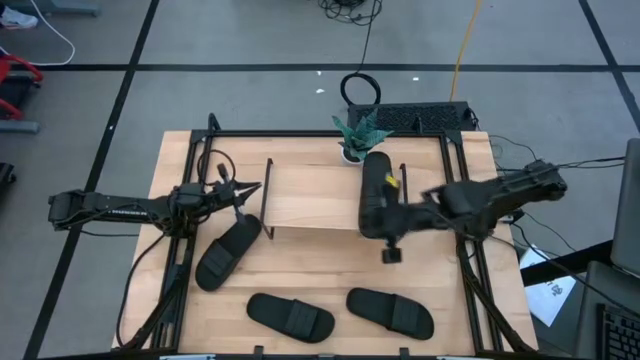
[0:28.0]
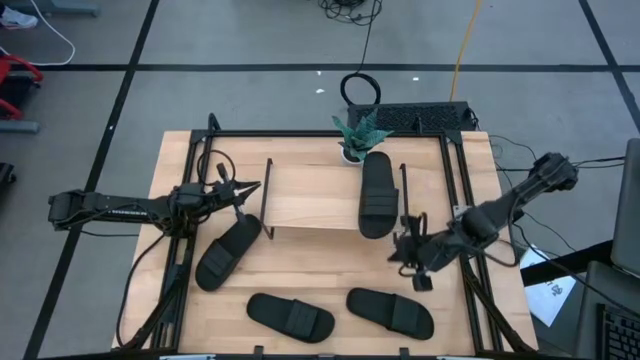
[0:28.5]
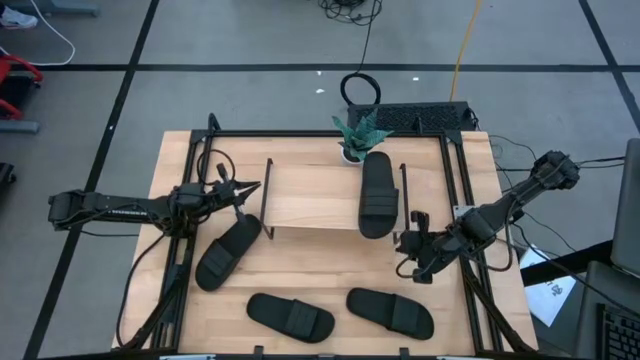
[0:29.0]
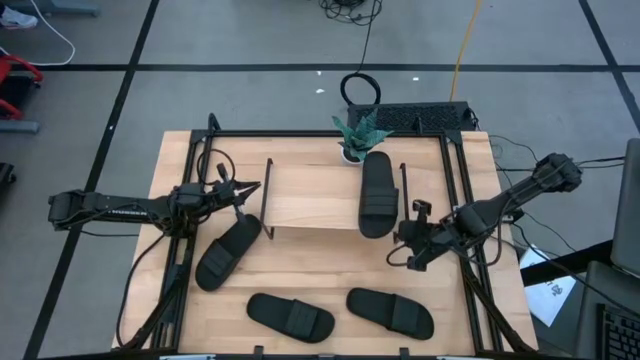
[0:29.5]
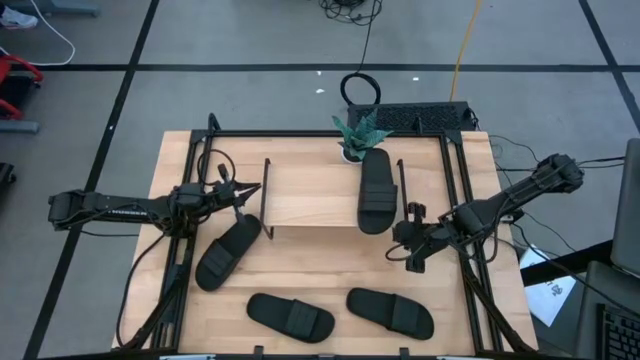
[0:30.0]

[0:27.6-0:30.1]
Task: Pick and place slides into the shelf
Adjust the shelf

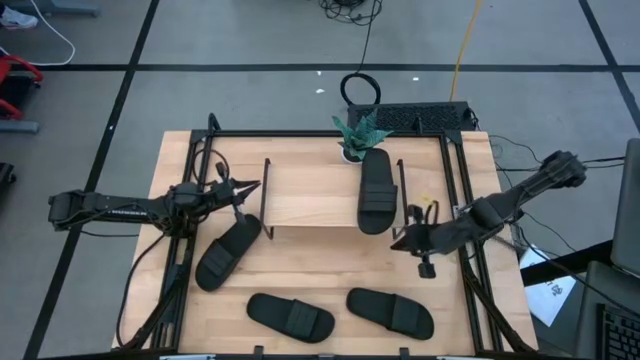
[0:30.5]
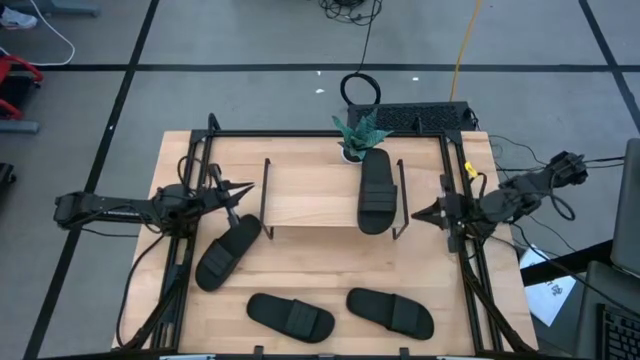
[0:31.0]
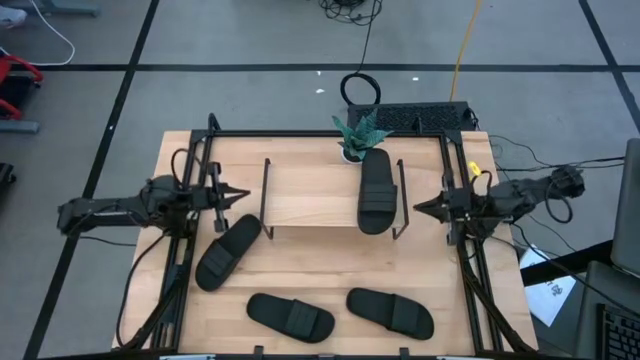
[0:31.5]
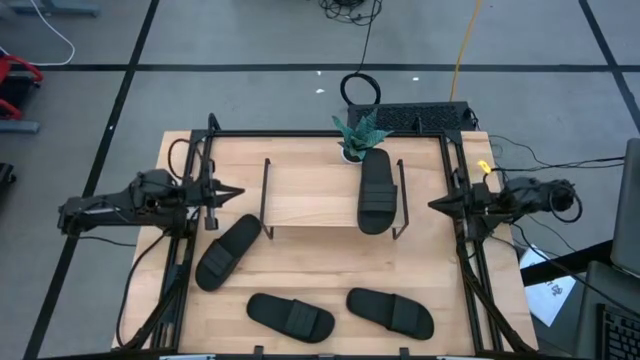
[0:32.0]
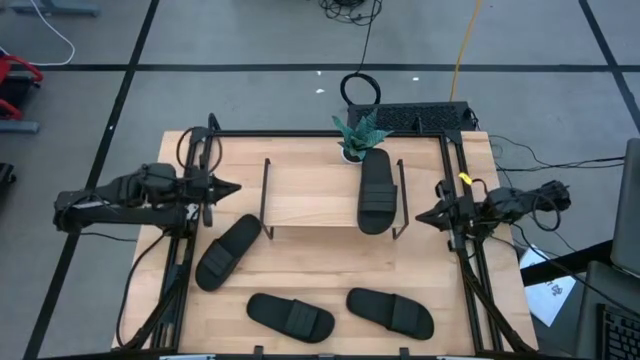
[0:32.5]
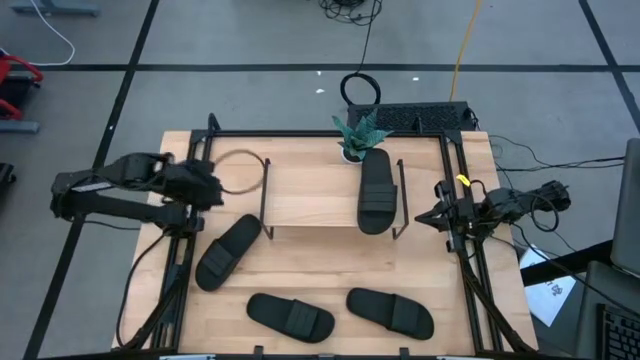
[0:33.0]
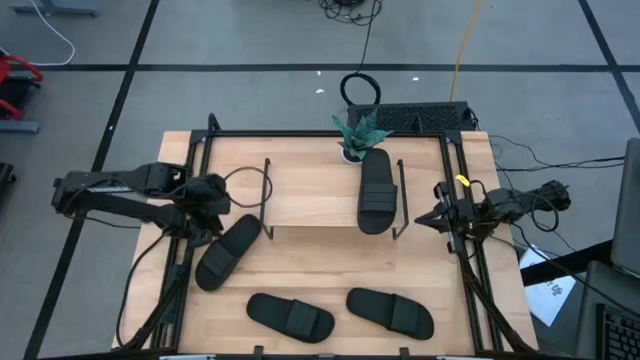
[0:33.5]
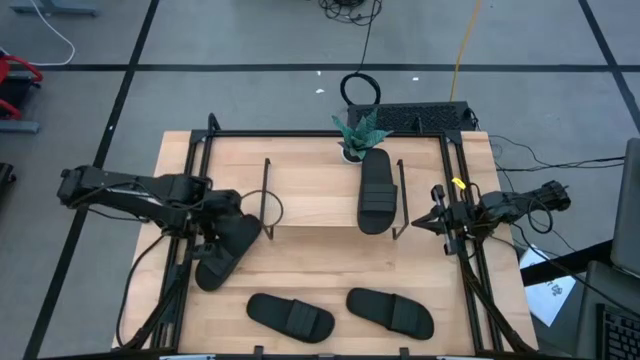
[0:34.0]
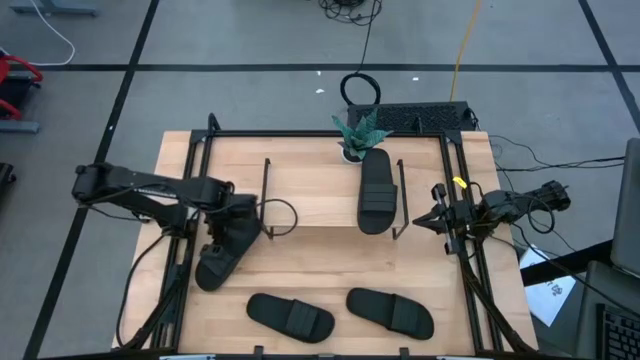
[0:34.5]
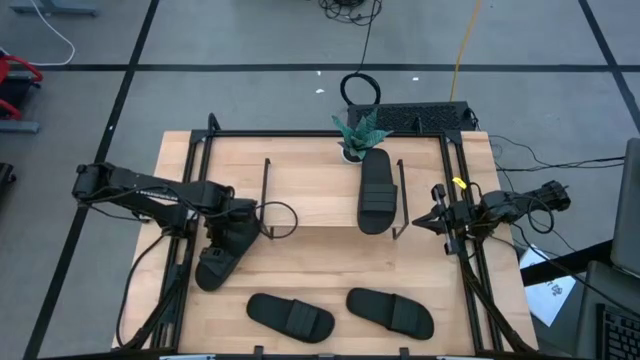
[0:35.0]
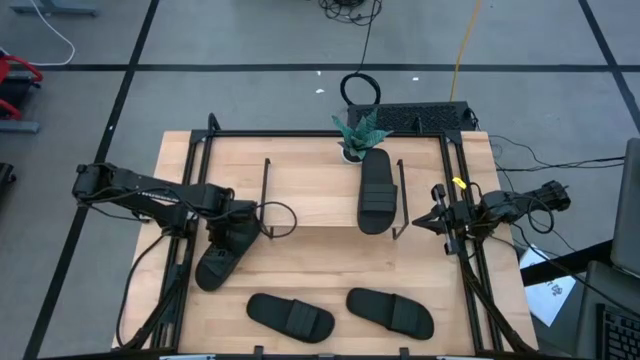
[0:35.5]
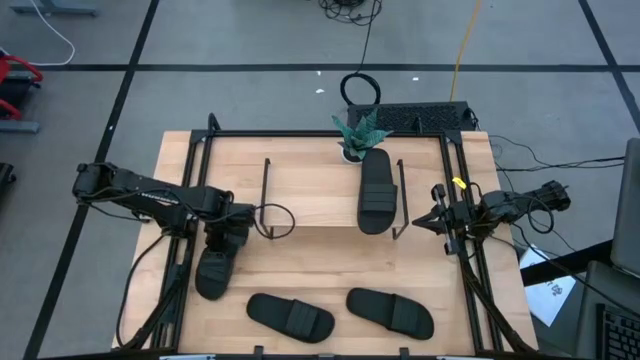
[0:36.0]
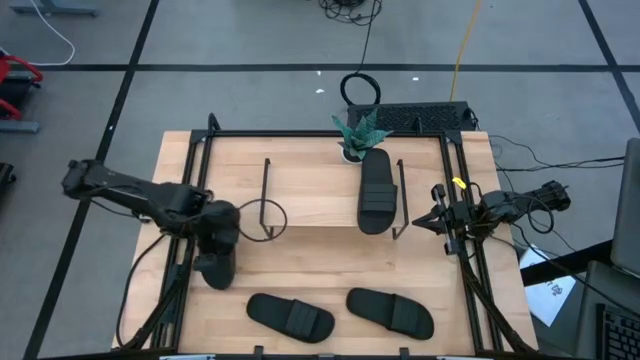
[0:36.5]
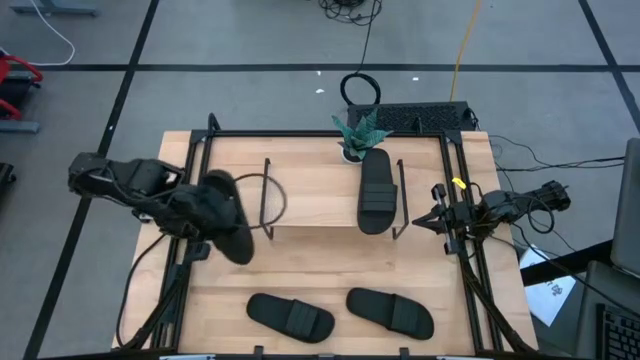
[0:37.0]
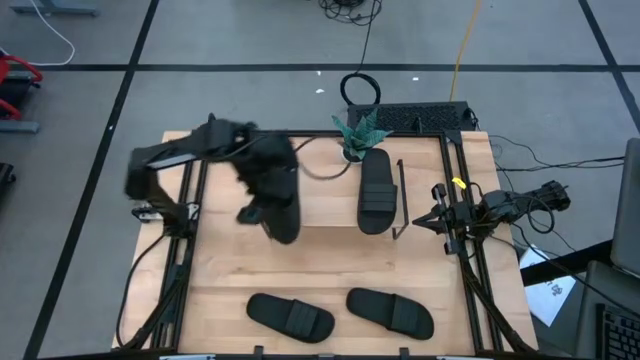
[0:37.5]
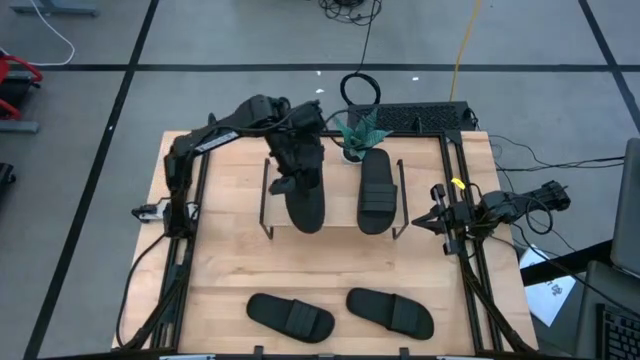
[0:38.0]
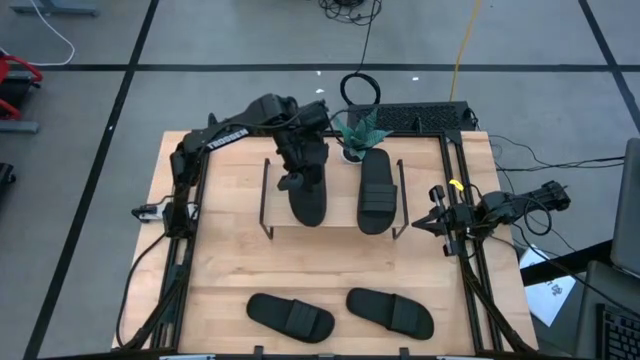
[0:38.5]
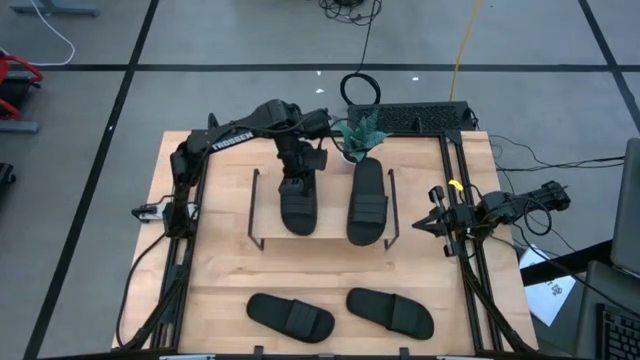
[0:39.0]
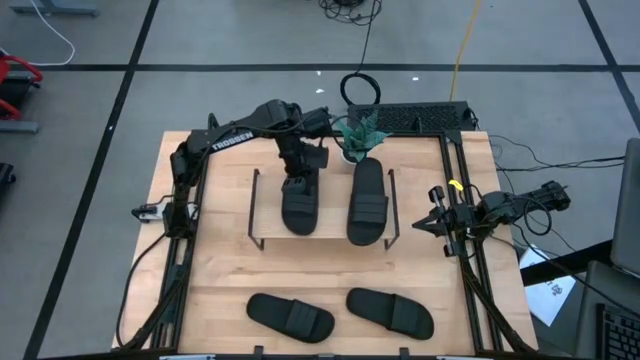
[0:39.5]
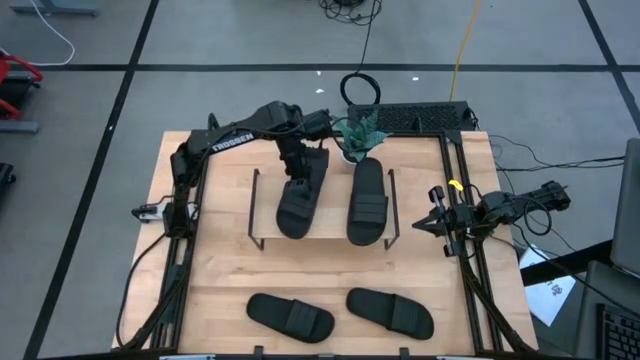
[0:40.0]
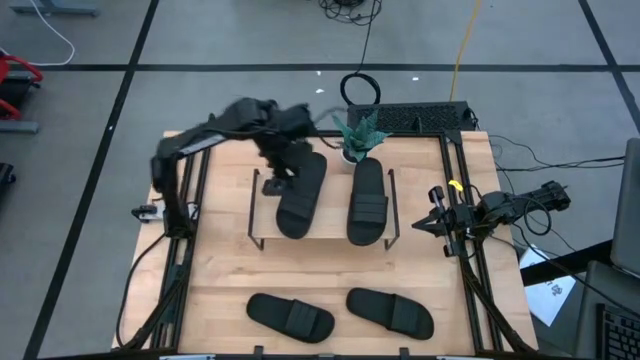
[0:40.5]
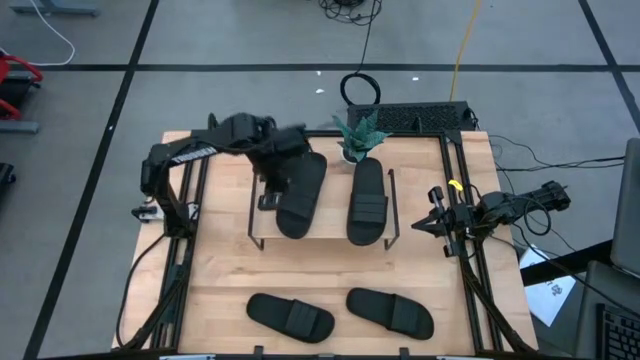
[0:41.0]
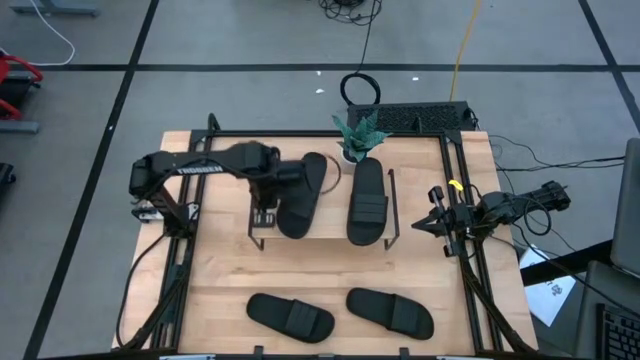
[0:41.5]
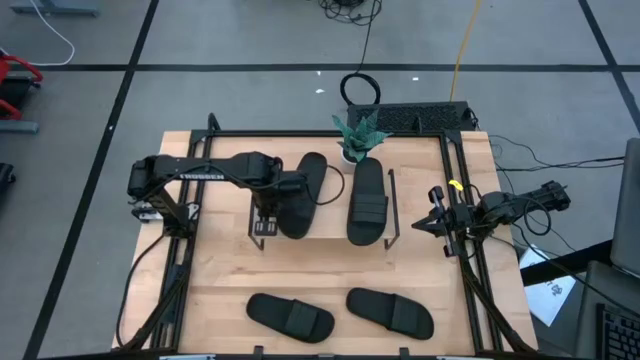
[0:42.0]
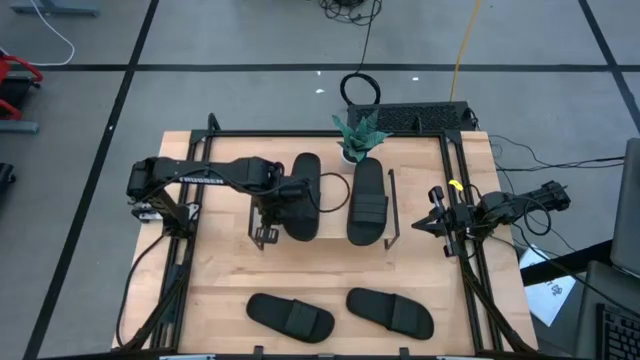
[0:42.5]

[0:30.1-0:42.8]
Put the left black slipper on the shelf

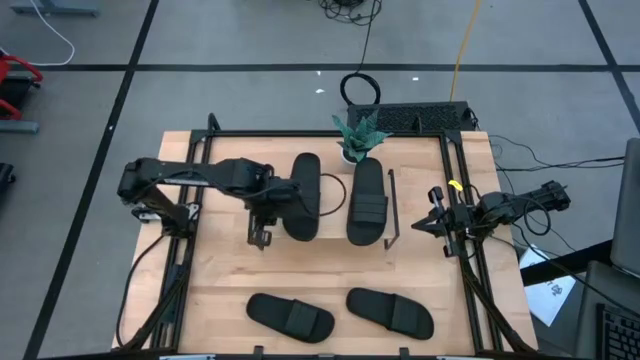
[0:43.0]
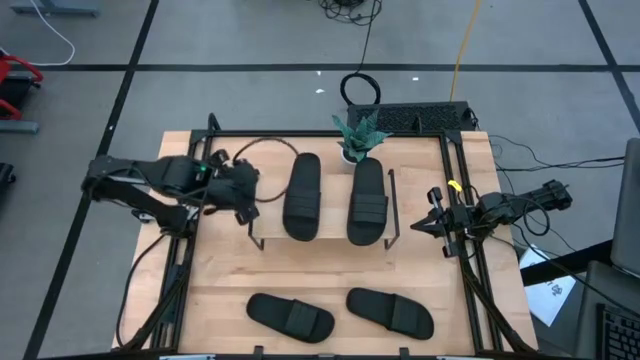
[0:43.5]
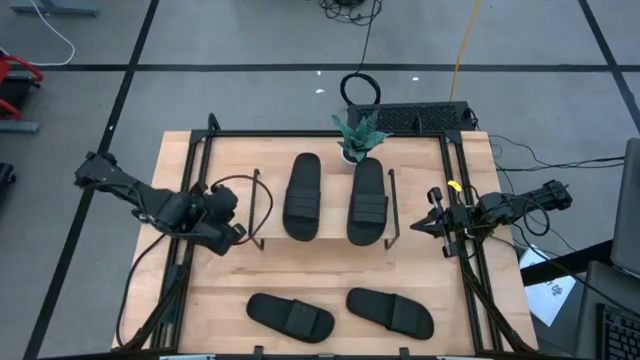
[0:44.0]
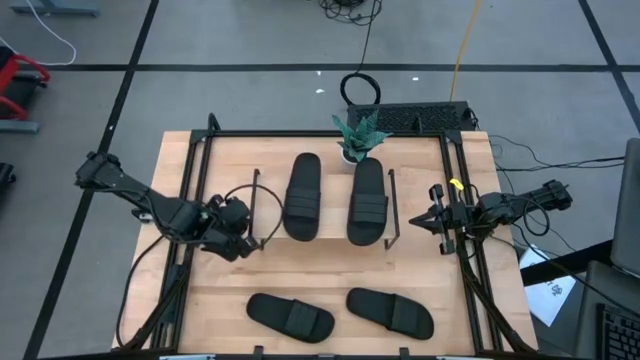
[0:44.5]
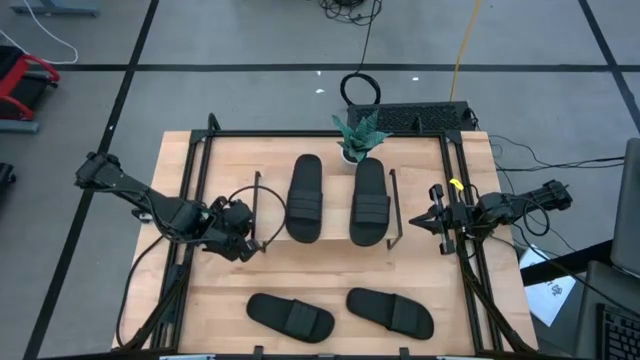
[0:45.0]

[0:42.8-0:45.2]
Adjust the shelf

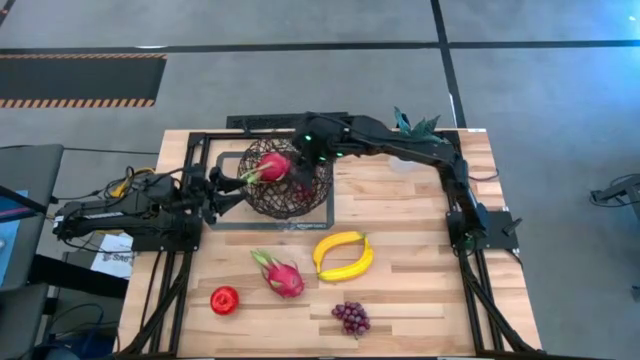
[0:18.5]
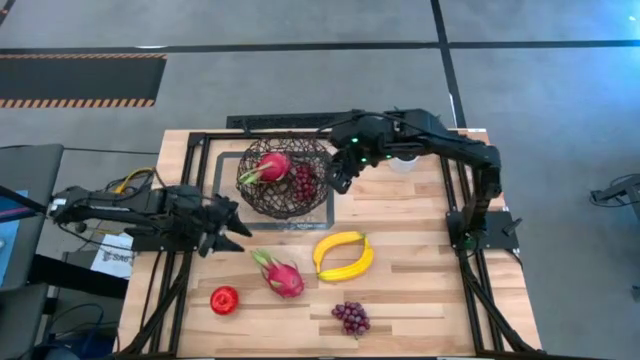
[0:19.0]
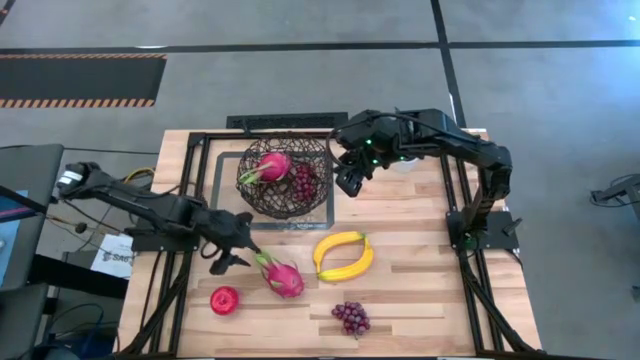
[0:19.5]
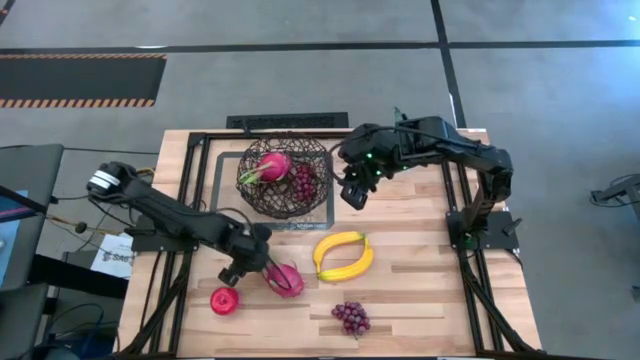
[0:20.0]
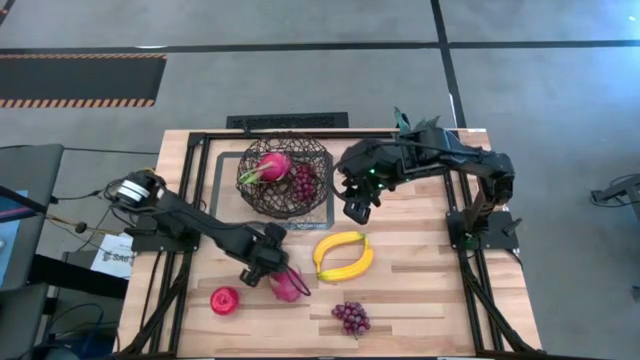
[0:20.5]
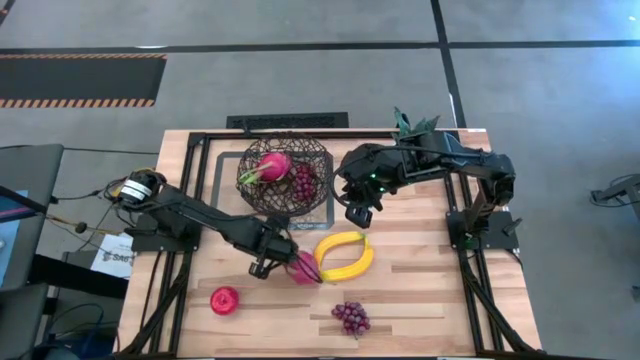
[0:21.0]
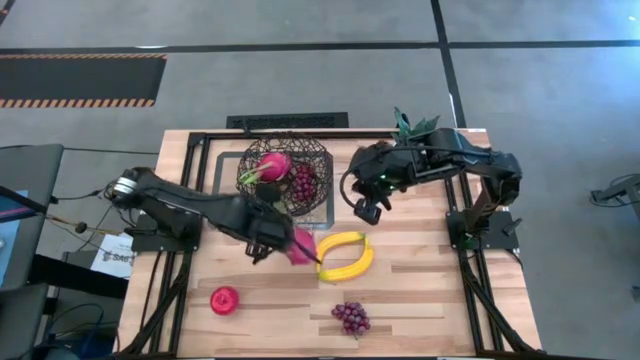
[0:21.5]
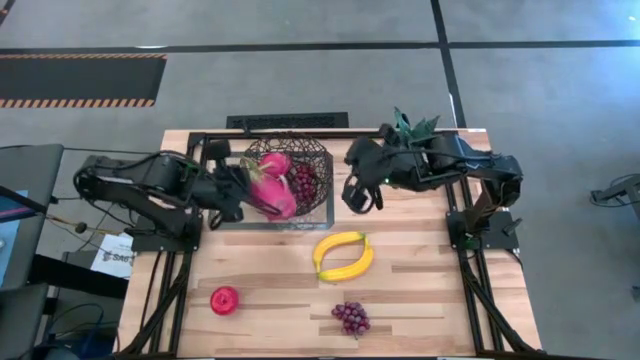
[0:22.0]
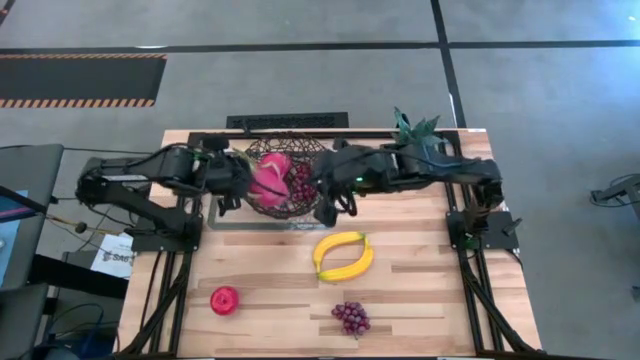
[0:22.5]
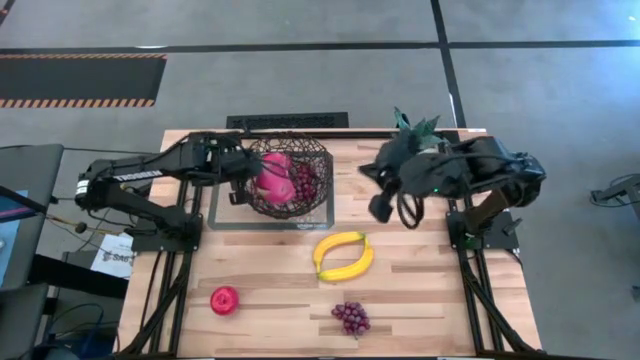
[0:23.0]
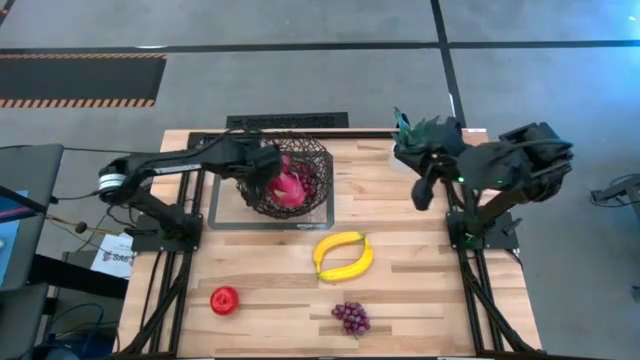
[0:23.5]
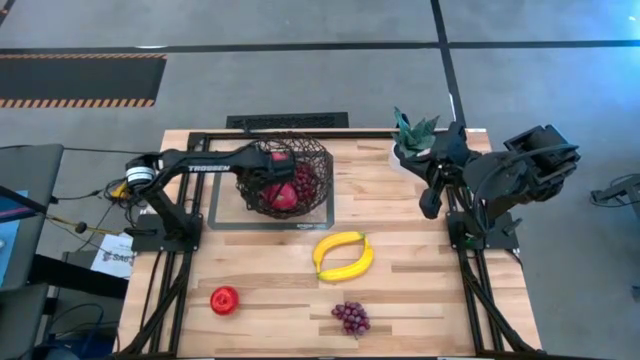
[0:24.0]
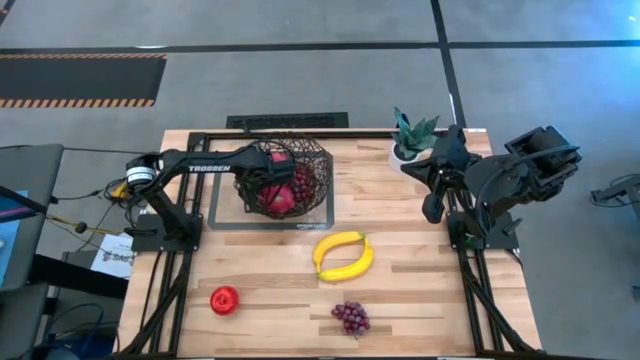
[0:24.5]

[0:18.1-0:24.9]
Task: Build produce basket
Put the pink dragonfruit into the black wire basket
